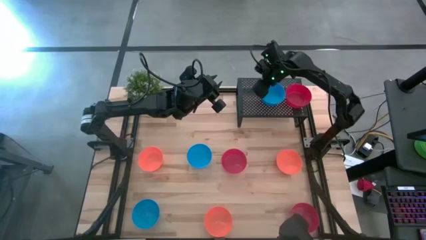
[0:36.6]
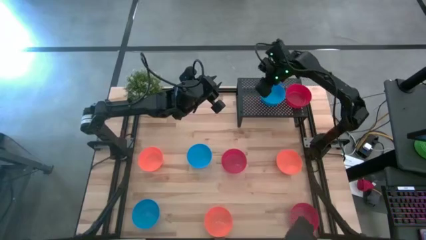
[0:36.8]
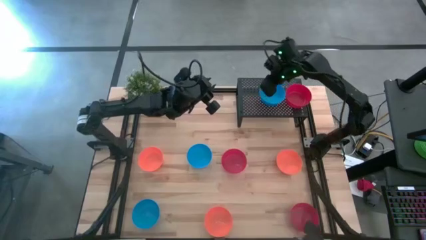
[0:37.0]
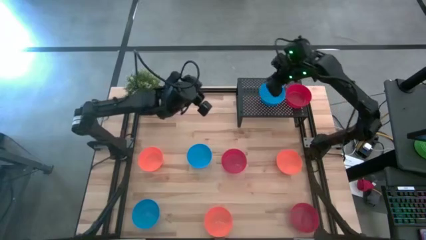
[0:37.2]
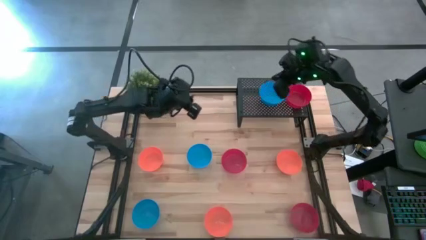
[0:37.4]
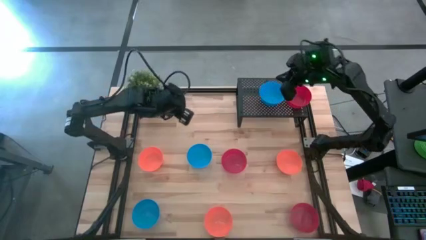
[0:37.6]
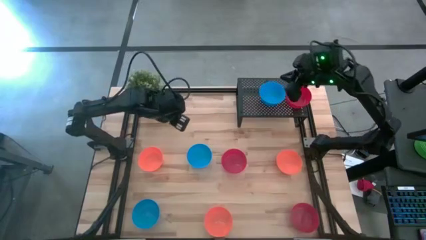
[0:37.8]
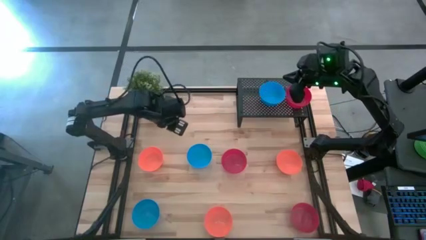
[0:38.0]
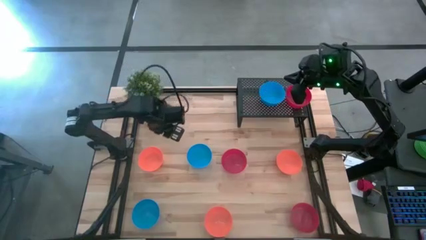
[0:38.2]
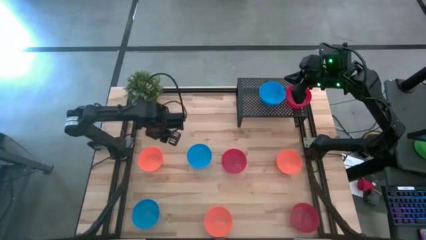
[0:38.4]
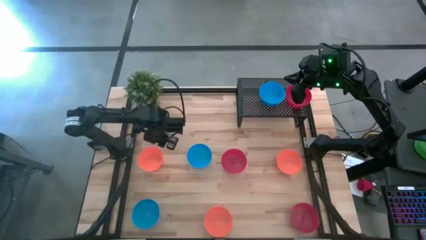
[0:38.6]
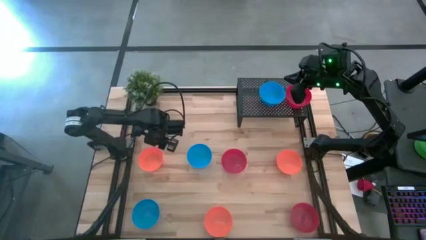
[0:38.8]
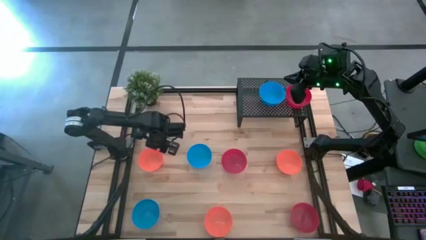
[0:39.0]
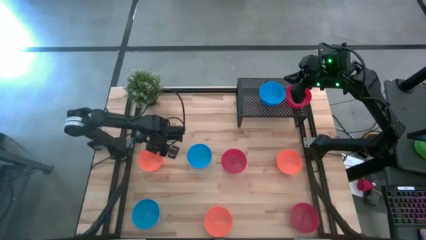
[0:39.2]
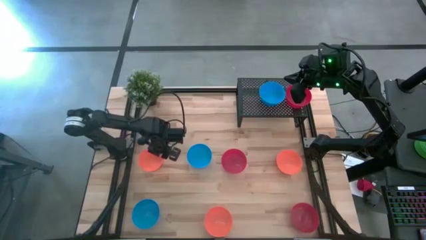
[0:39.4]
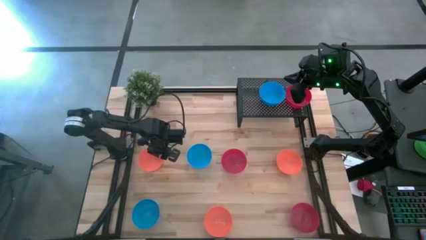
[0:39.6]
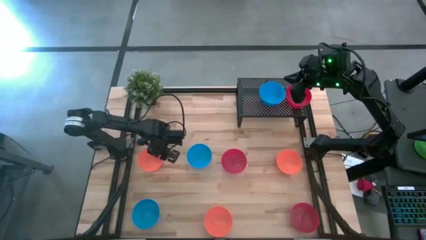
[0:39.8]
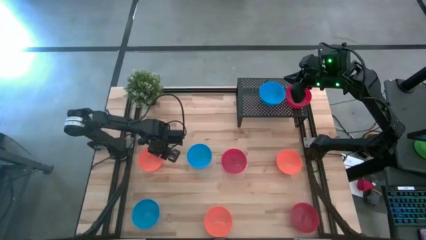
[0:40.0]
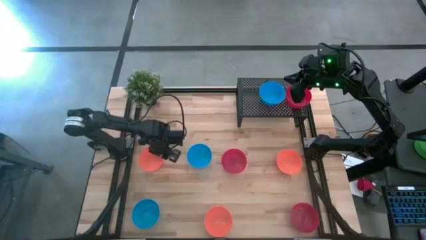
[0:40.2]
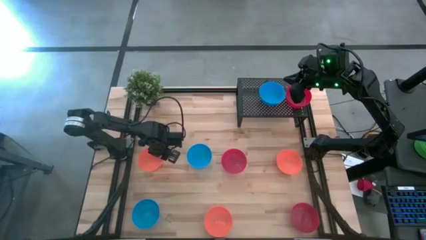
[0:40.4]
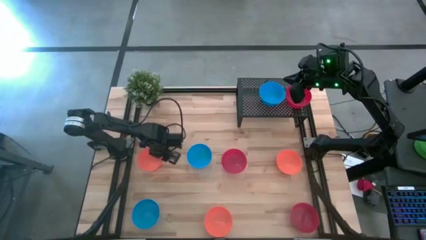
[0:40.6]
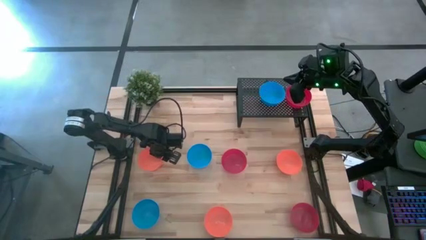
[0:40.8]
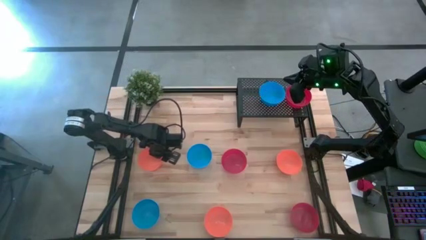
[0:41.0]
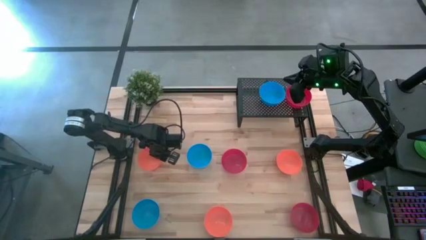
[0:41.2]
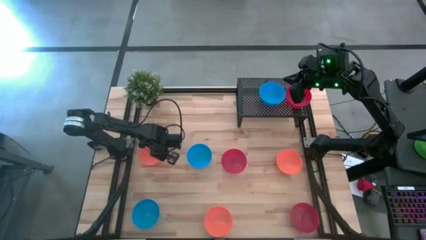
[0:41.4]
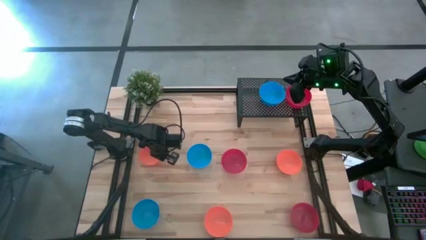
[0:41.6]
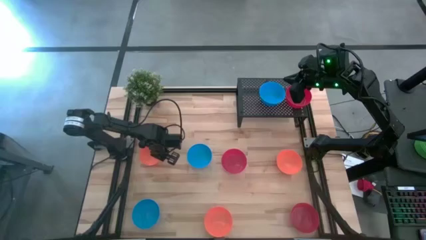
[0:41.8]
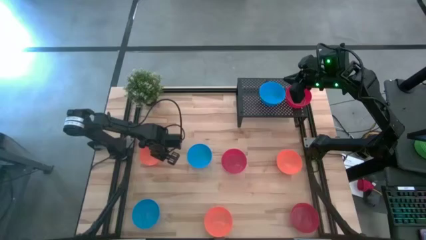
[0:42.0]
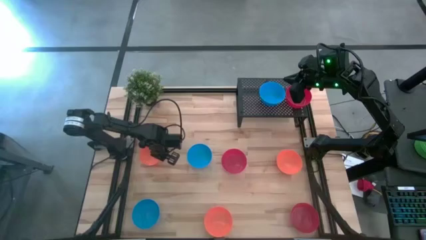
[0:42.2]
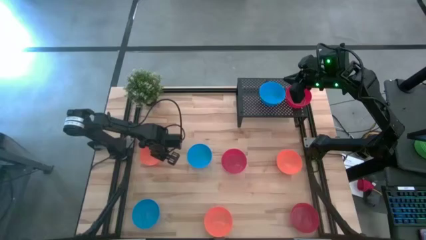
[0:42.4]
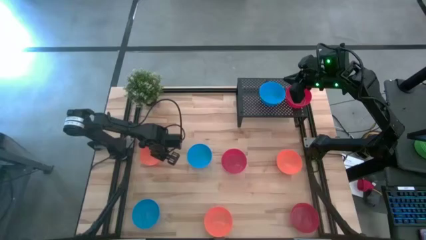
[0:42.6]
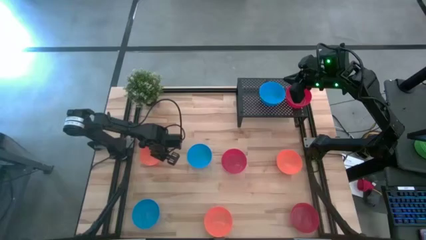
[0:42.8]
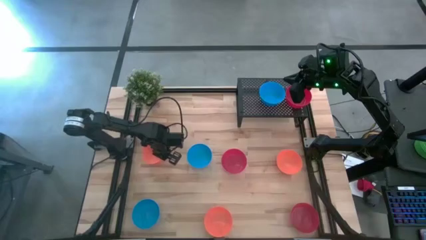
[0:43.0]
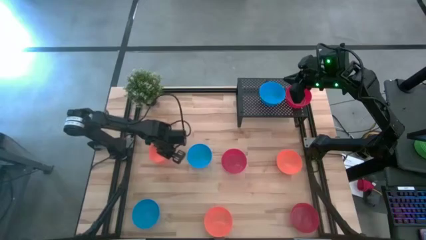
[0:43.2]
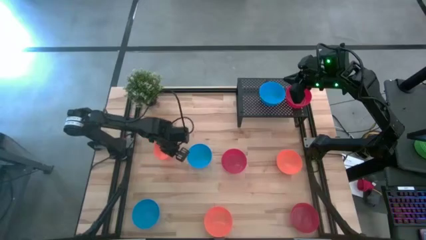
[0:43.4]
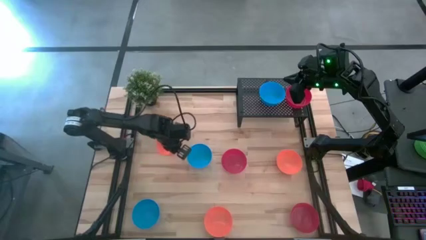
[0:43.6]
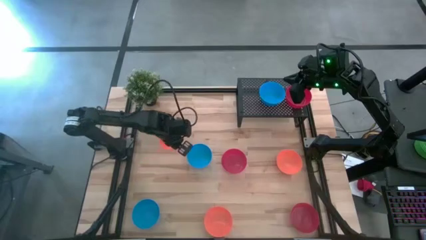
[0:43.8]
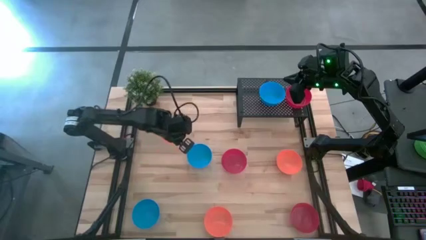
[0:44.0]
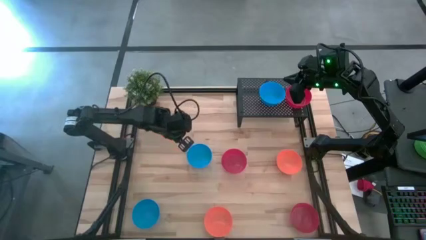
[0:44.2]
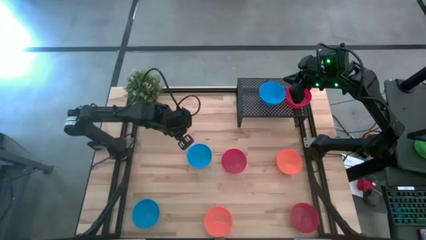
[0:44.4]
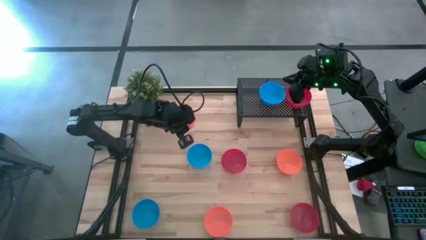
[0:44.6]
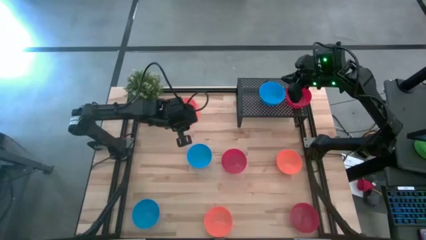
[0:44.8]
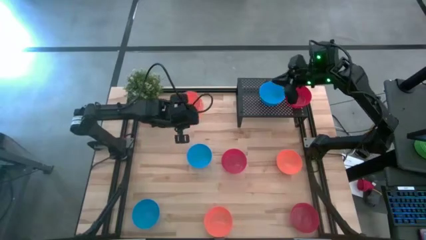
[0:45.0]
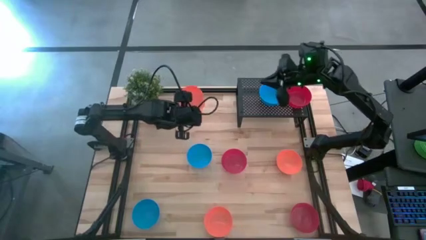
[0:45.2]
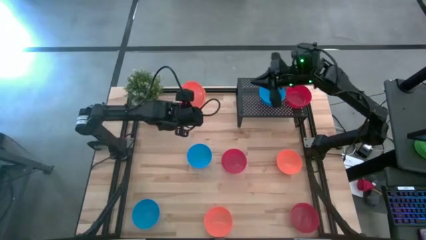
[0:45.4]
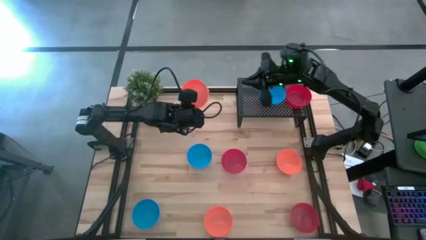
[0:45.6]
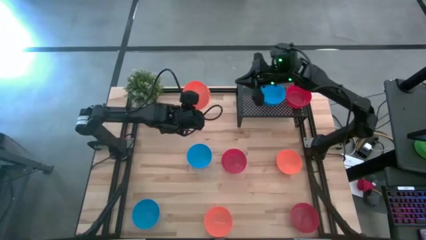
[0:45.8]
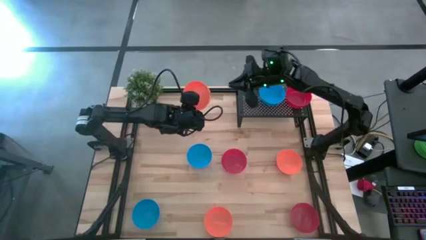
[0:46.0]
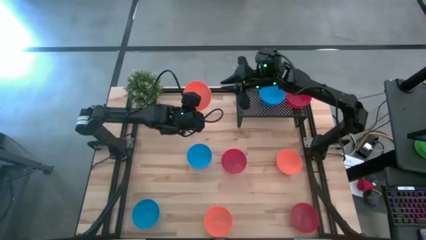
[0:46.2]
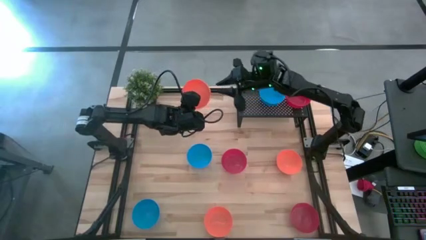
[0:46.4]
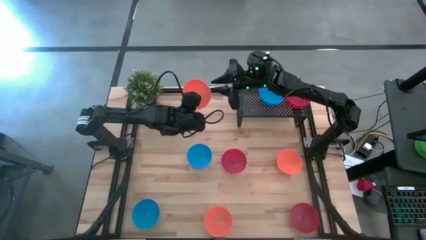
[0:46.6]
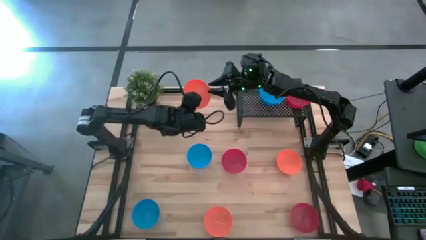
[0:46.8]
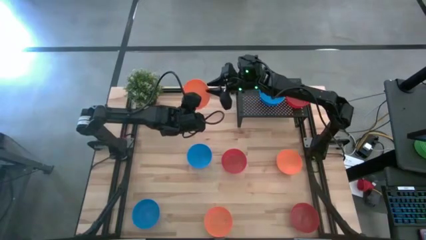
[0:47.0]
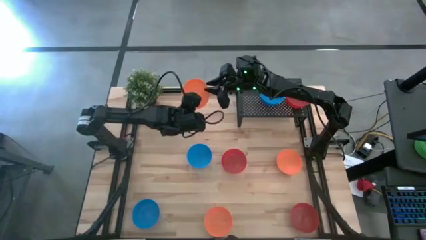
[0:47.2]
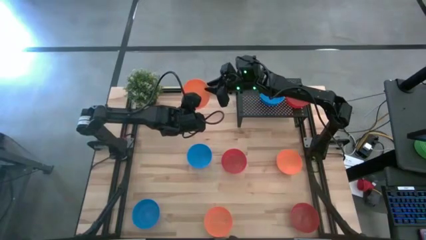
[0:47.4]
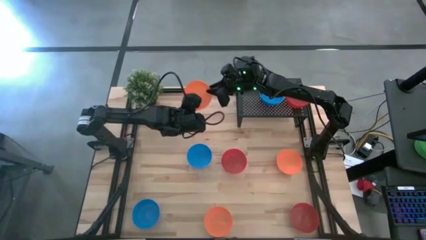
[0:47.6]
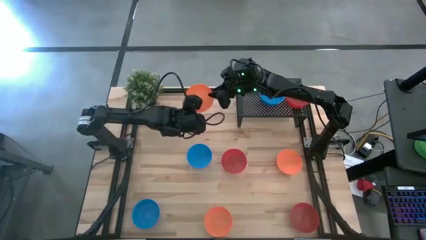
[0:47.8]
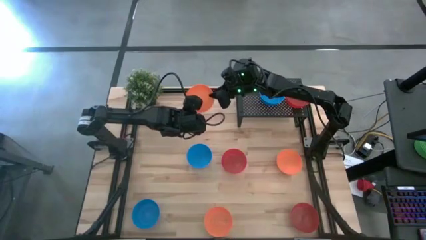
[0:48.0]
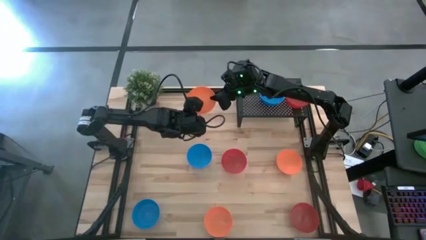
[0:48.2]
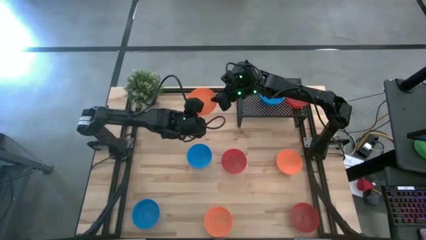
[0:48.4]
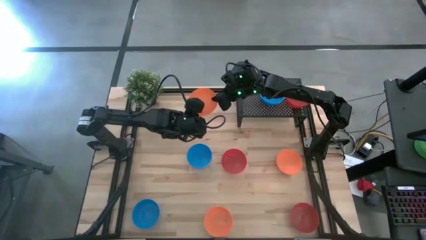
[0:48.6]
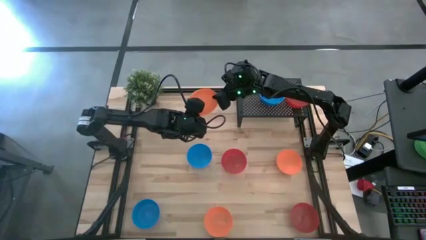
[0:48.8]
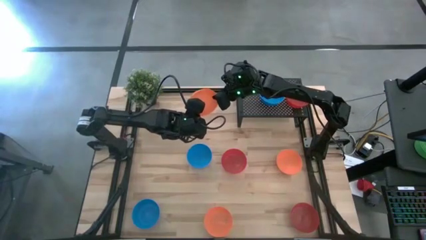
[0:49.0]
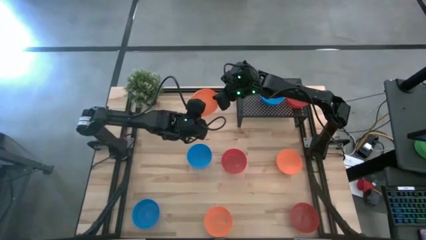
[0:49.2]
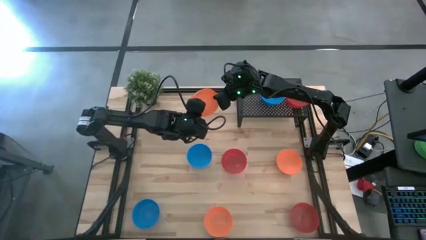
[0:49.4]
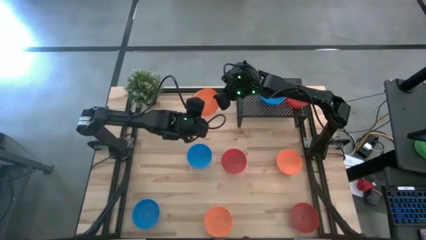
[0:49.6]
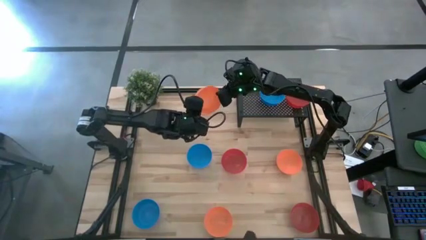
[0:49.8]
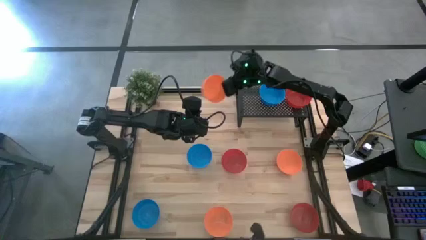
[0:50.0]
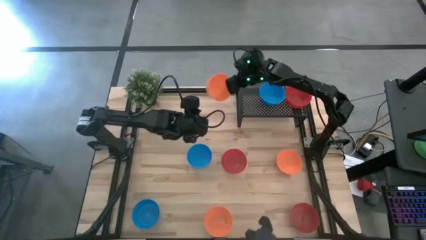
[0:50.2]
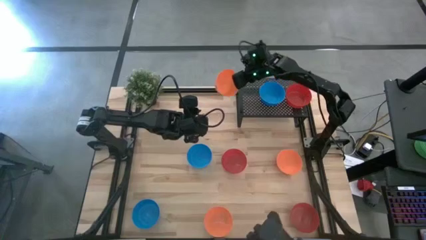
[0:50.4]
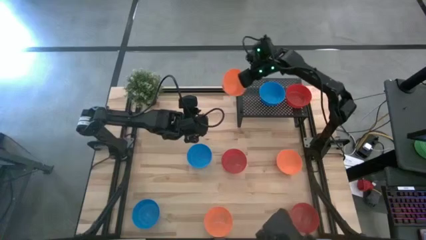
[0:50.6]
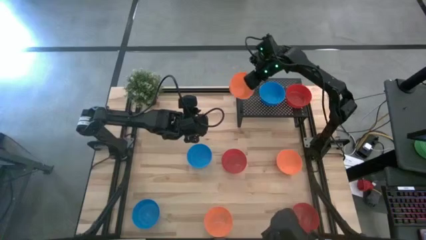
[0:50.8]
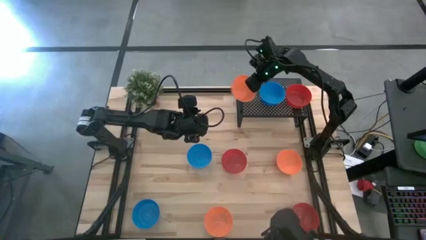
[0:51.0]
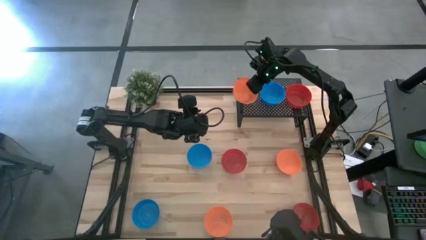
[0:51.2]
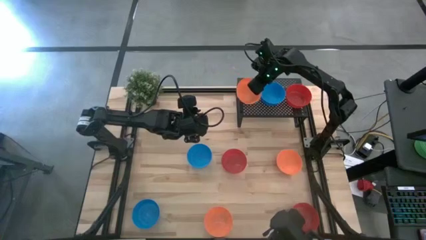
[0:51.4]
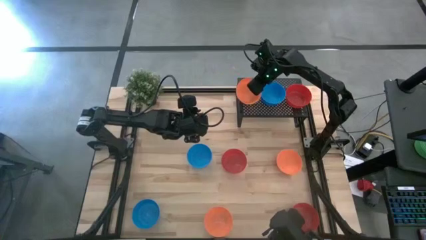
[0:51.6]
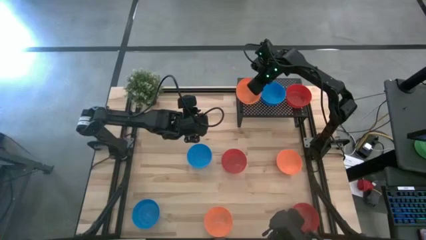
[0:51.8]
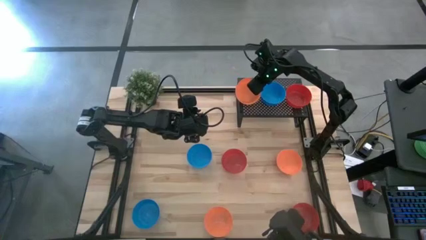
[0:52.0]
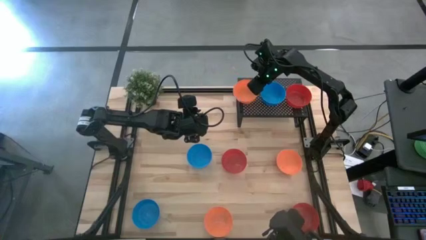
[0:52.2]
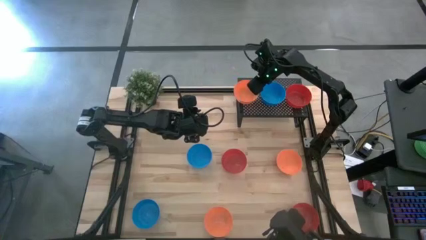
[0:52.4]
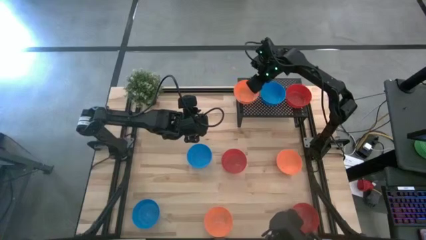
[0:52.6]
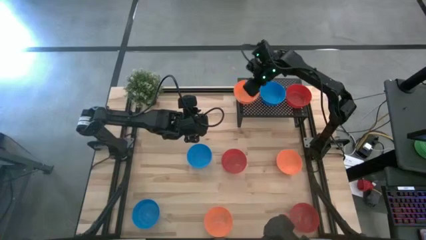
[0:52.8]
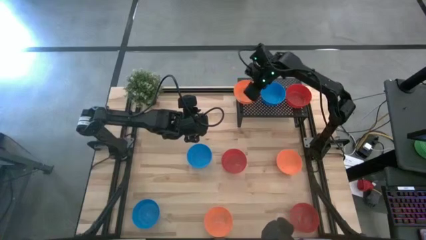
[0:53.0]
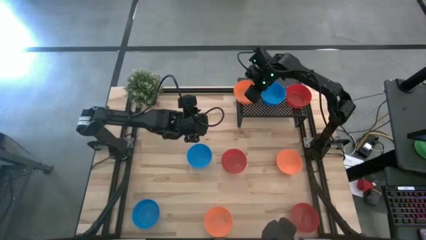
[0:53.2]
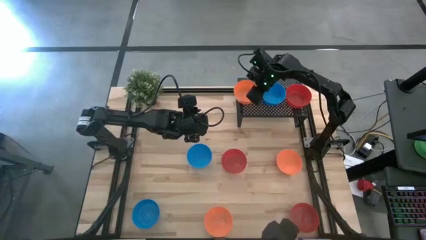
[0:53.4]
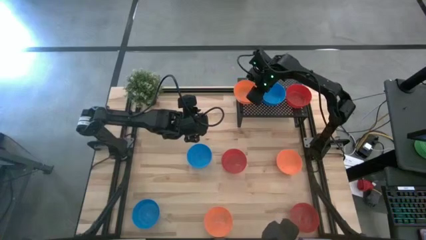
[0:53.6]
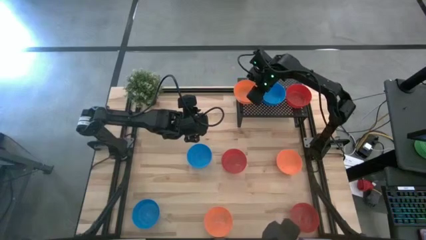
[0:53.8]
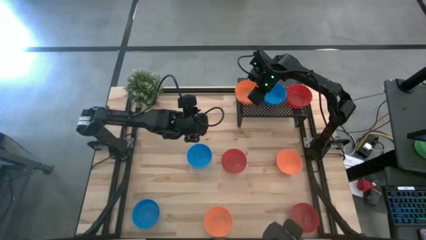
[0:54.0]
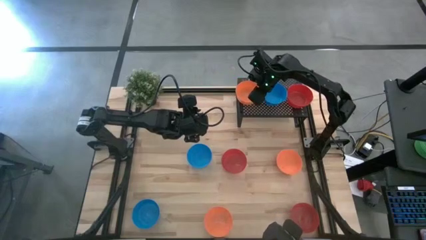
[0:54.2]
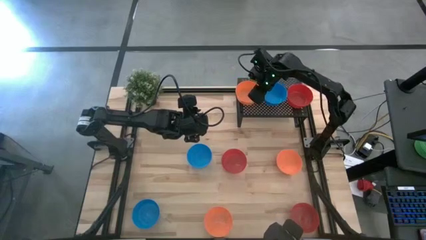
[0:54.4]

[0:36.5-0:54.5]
Task: Pick & Place Mini bowls
Put the top left orange bowl on the shelf
